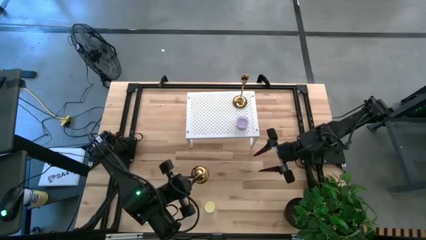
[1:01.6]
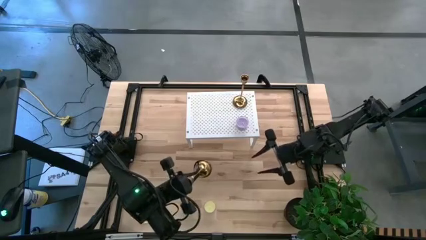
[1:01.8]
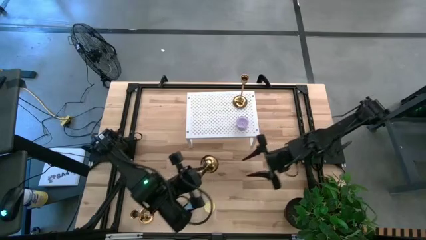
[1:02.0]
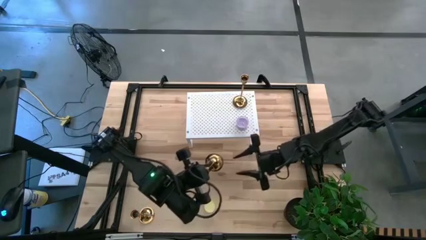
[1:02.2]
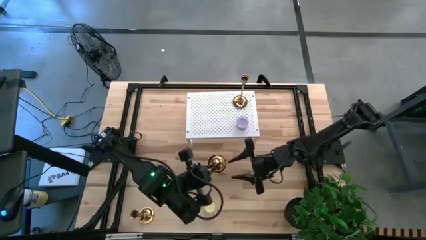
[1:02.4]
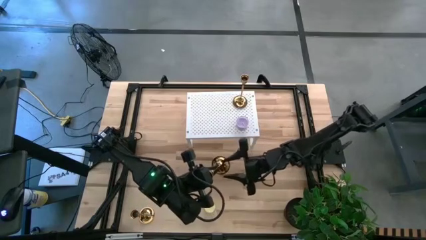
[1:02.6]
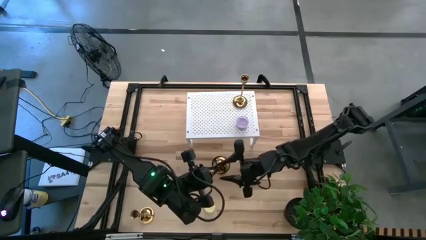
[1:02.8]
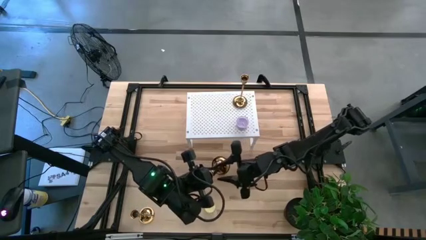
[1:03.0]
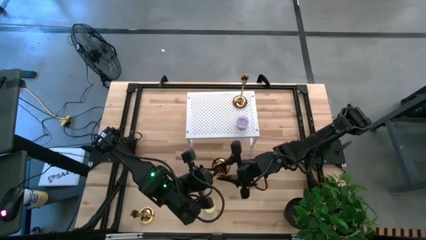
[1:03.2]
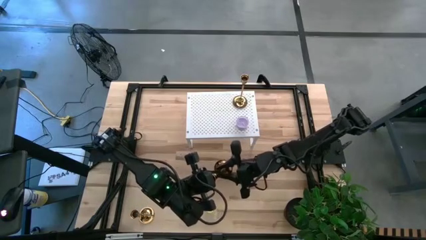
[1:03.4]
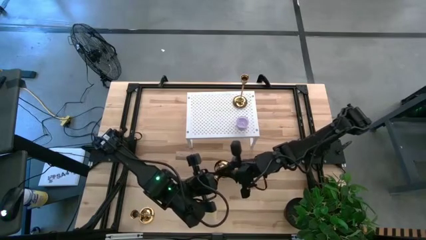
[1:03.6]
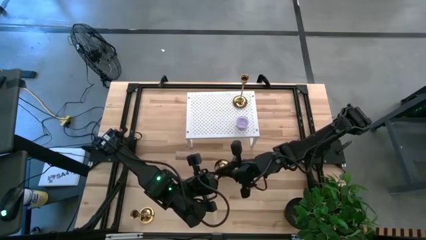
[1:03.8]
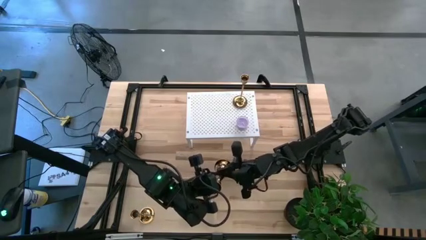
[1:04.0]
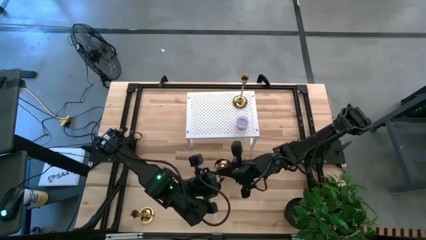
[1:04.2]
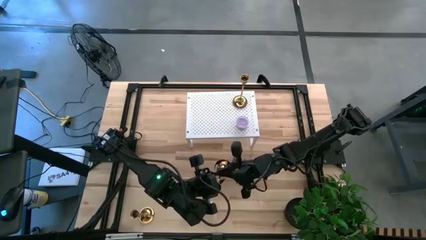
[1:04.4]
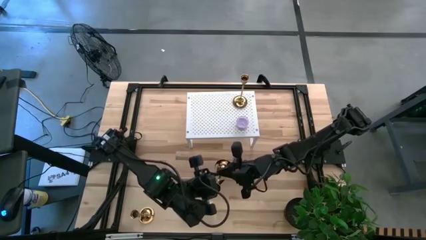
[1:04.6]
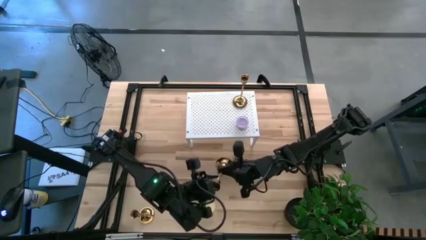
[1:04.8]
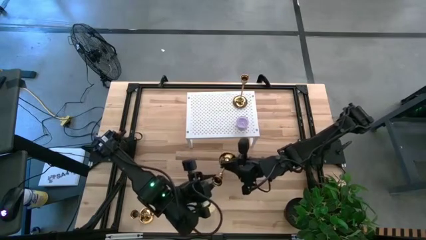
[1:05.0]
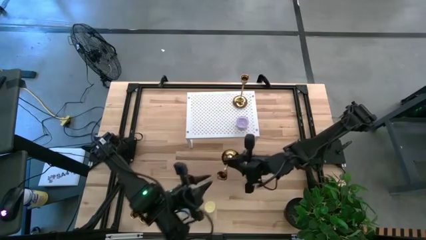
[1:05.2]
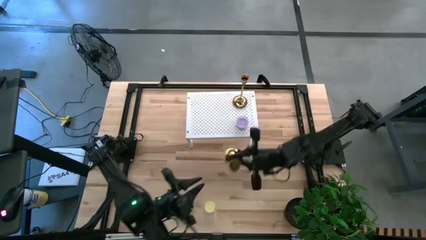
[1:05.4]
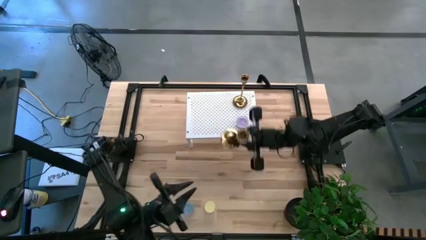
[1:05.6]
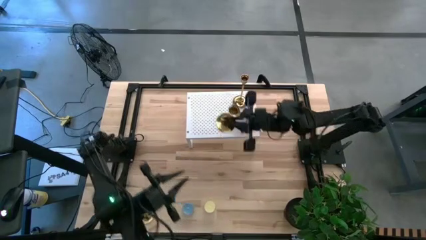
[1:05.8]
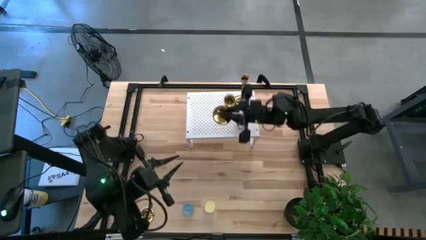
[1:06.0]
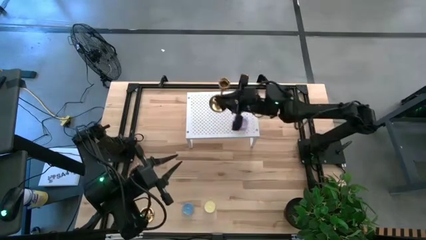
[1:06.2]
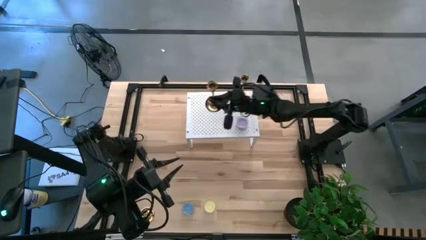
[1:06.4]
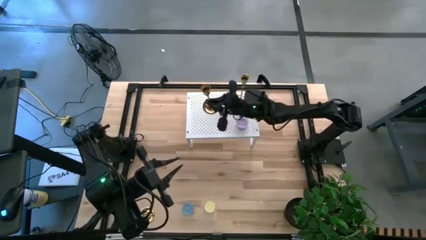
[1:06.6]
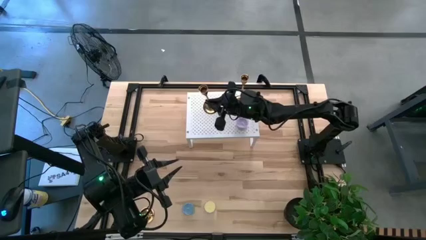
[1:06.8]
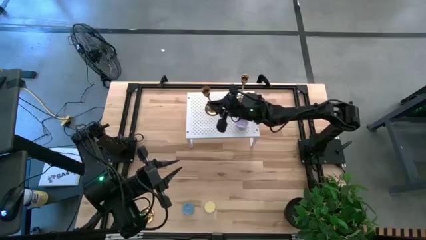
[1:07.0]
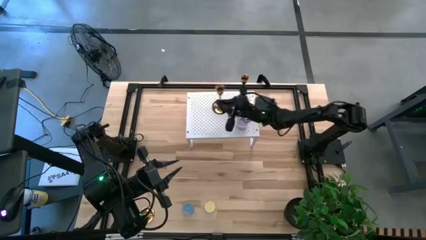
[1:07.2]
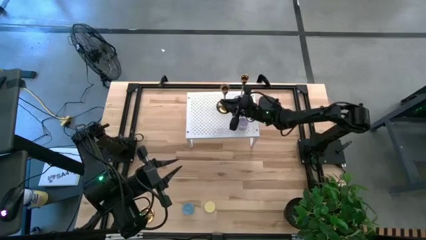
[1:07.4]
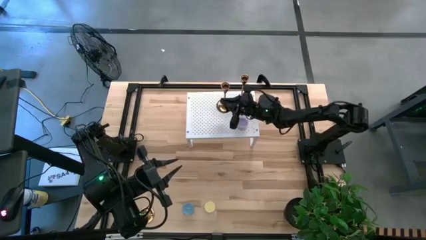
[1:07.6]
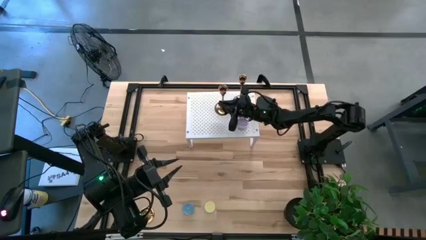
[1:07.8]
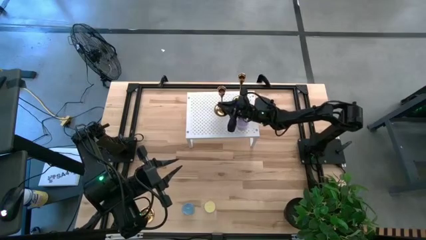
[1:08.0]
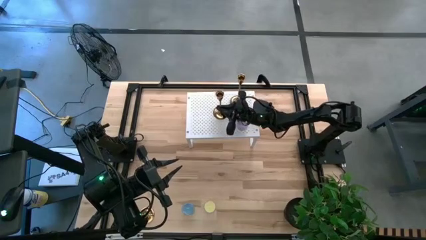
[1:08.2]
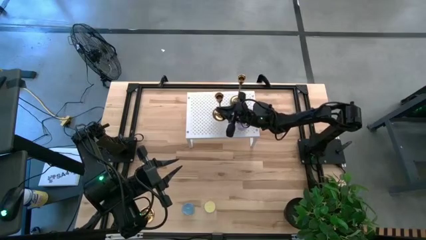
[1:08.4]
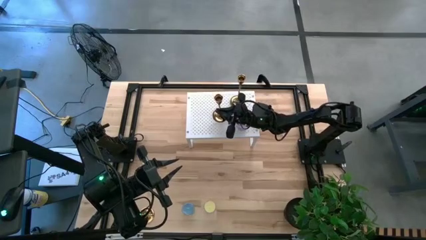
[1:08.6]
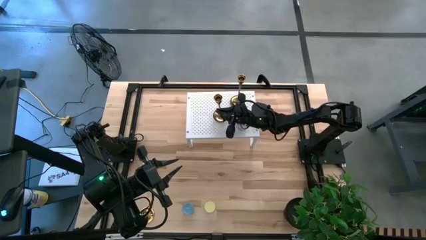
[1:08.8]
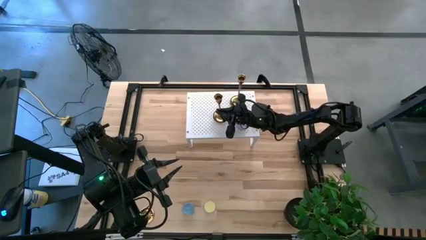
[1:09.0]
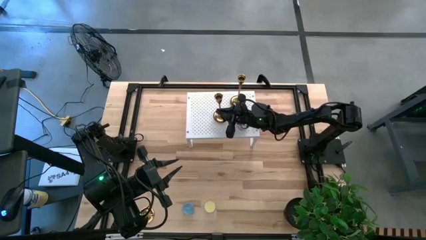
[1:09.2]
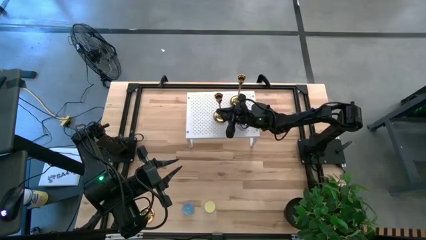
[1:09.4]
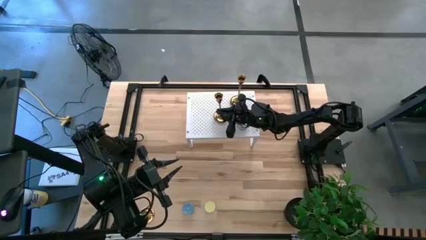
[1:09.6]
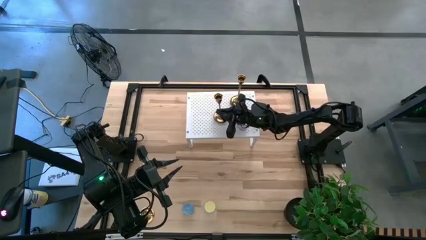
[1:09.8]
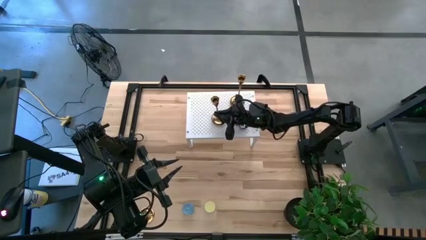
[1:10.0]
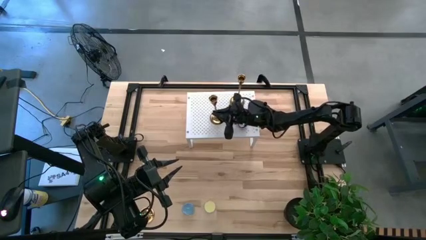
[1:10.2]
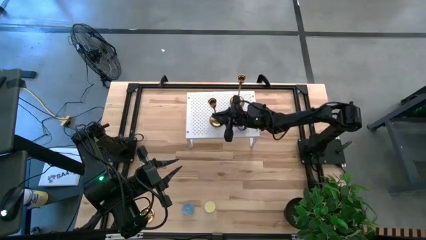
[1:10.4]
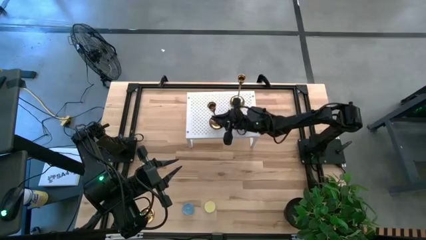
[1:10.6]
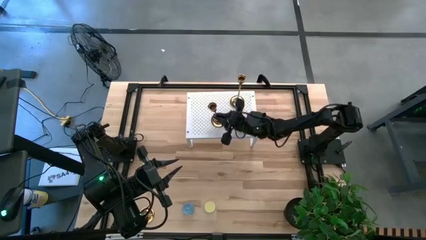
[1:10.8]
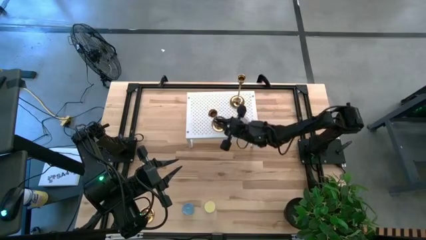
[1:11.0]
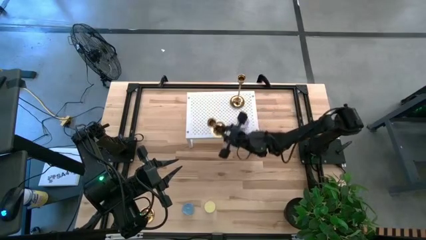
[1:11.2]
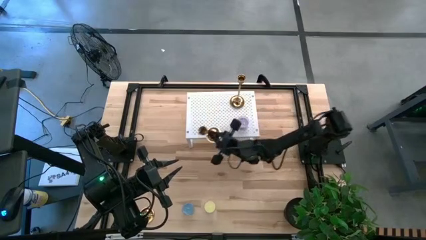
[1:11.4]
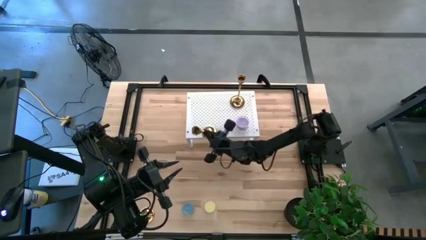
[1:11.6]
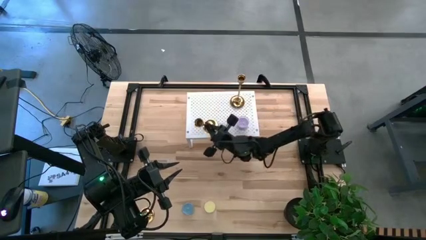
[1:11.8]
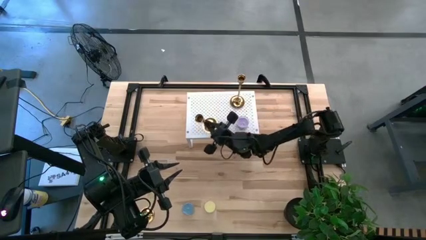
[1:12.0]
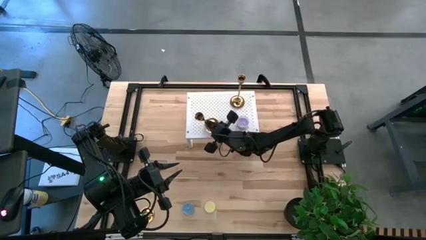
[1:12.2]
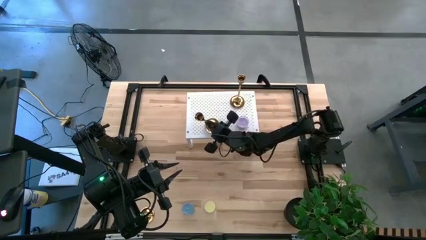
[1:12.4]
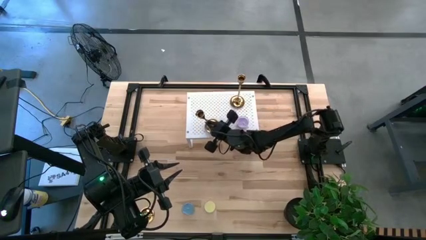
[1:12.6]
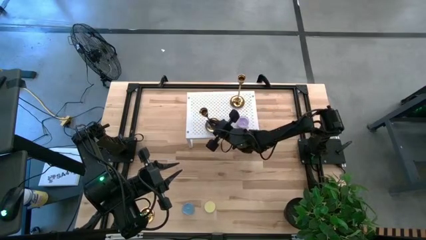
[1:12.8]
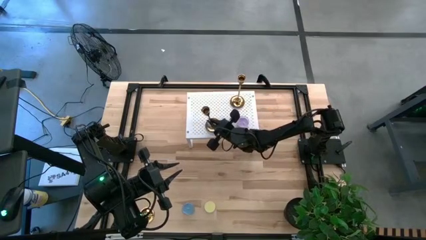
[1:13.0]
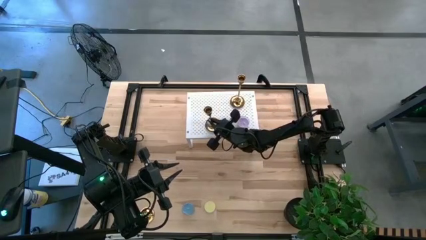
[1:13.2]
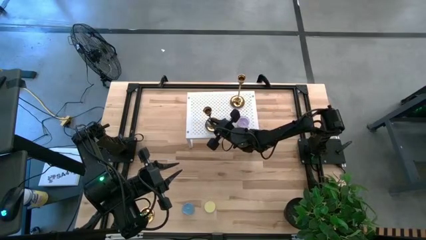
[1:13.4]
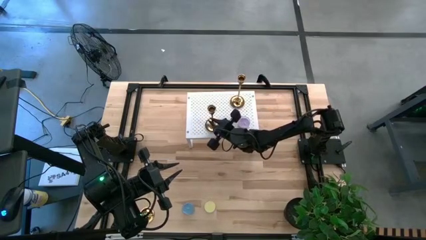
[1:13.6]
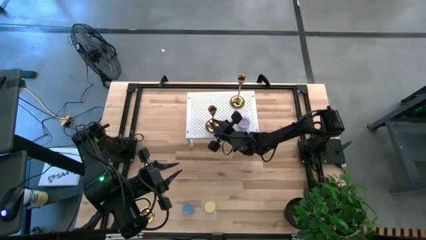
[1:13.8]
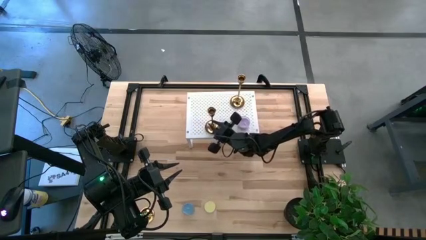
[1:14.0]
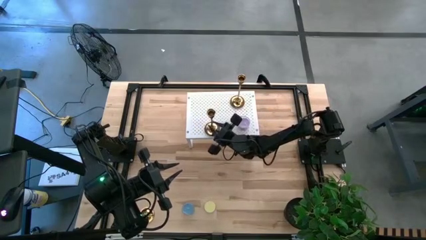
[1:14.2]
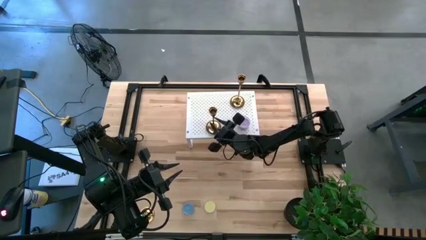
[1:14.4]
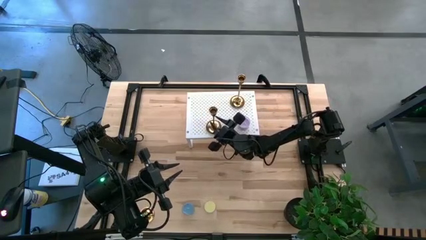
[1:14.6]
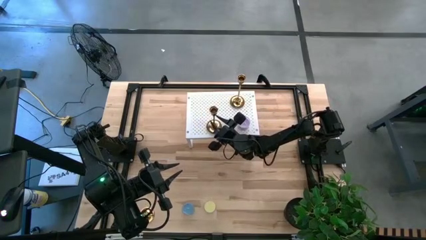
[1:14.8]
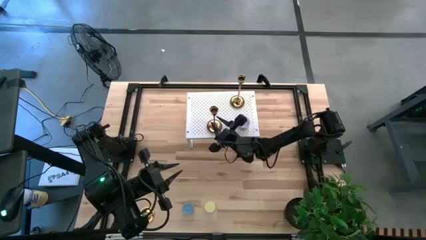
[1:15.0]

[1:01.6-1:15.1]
Task: Pick & Place candle stick holders
Put the right gold candle holder on the shelf
